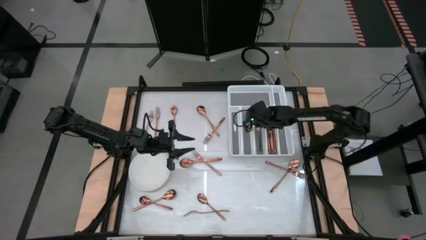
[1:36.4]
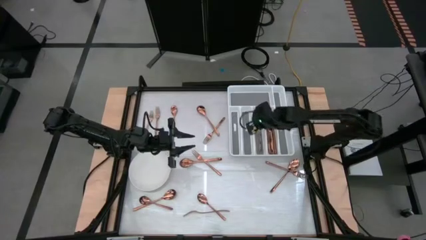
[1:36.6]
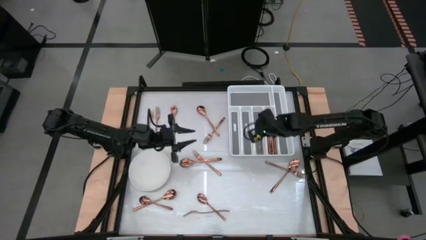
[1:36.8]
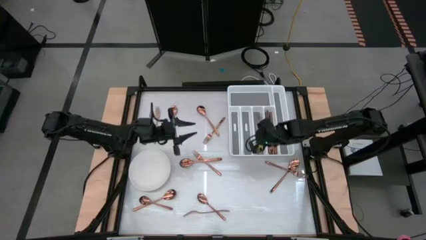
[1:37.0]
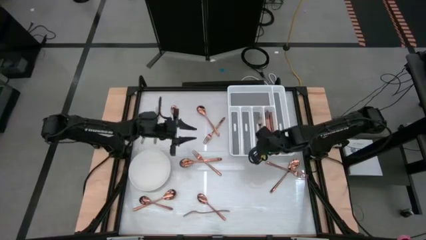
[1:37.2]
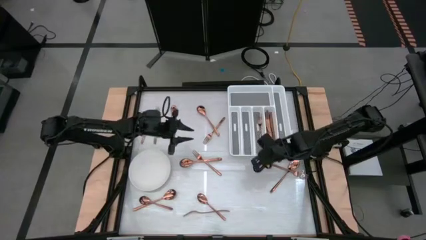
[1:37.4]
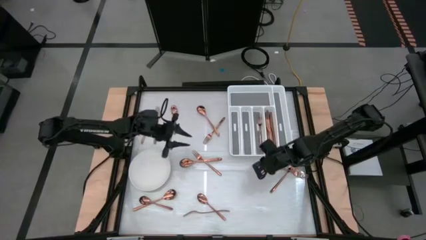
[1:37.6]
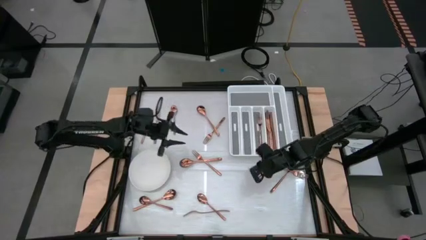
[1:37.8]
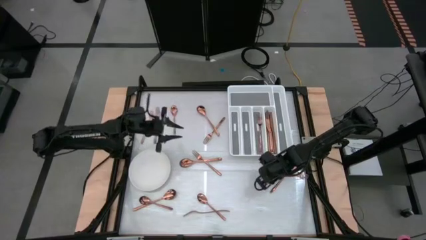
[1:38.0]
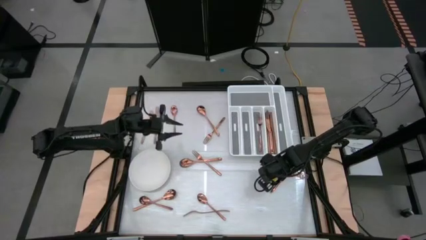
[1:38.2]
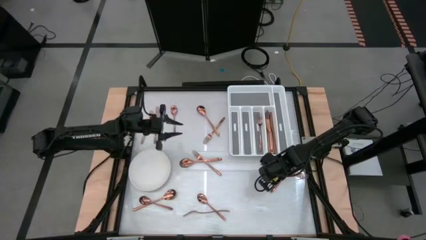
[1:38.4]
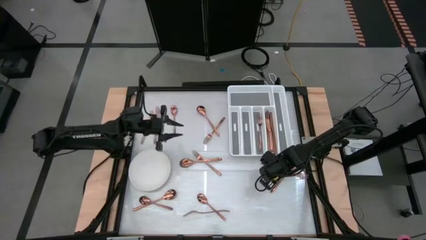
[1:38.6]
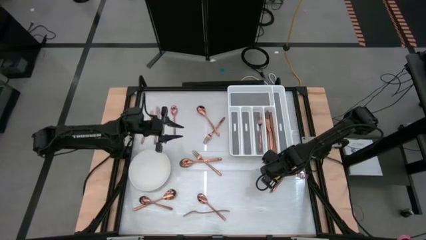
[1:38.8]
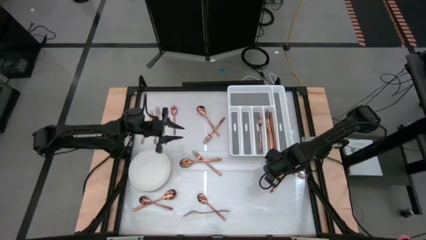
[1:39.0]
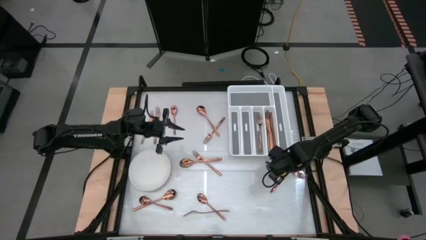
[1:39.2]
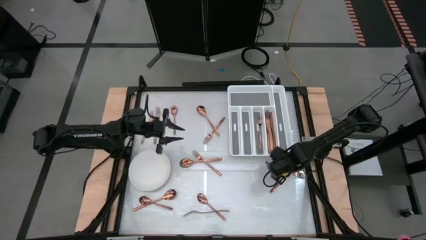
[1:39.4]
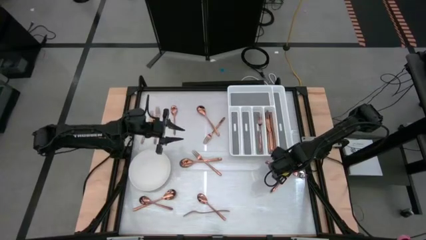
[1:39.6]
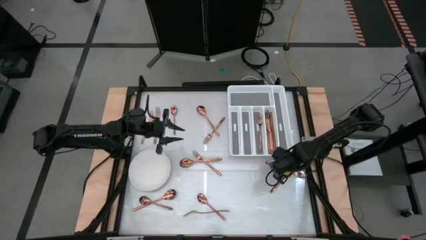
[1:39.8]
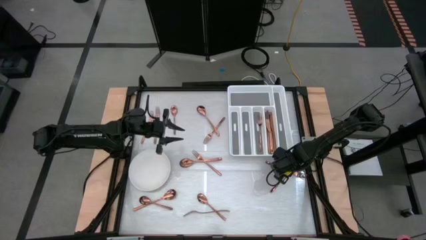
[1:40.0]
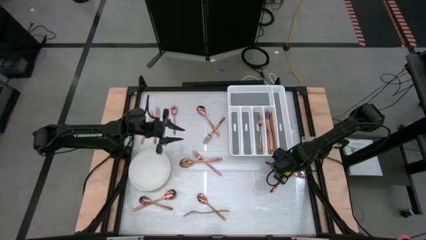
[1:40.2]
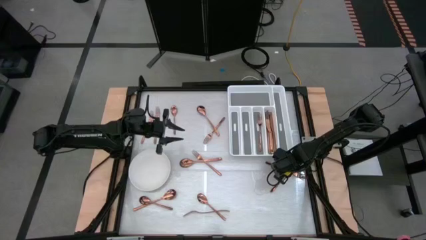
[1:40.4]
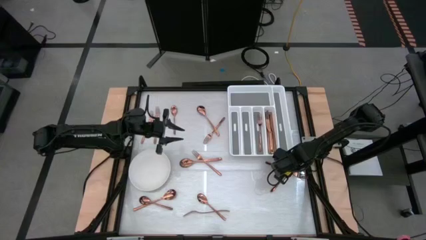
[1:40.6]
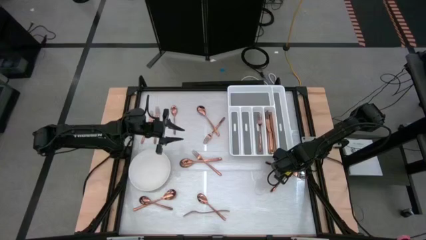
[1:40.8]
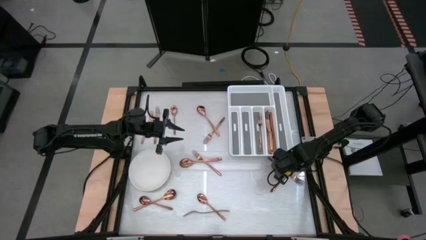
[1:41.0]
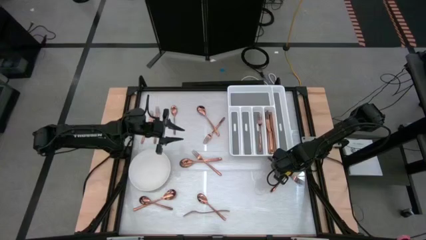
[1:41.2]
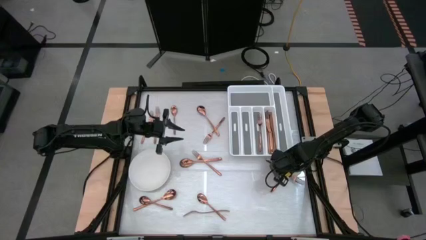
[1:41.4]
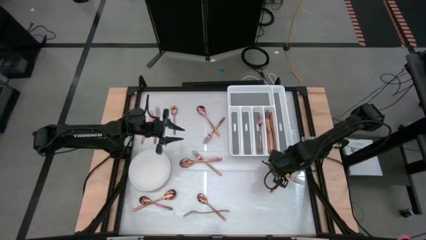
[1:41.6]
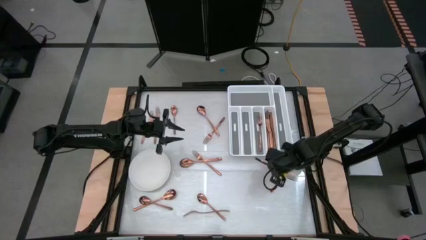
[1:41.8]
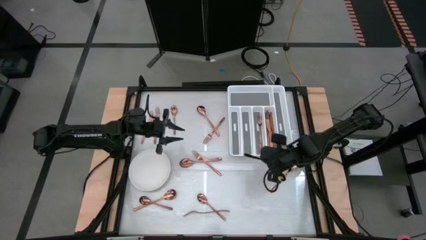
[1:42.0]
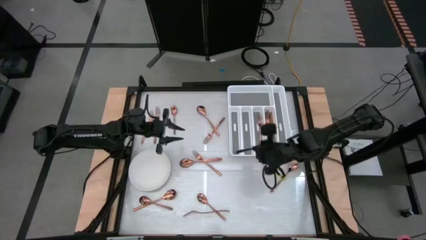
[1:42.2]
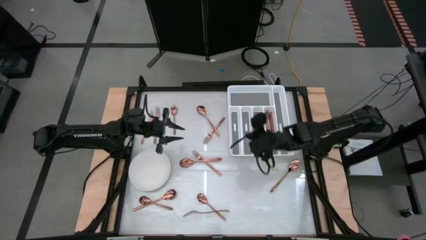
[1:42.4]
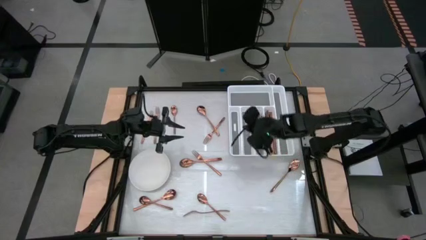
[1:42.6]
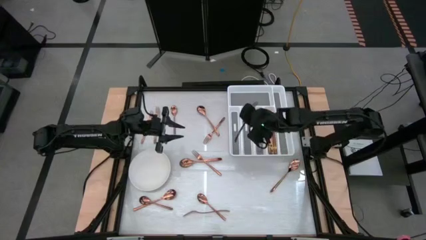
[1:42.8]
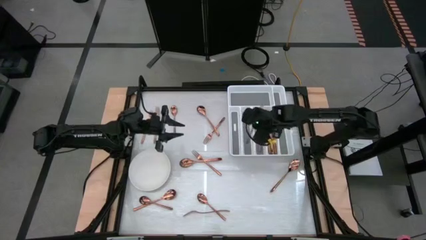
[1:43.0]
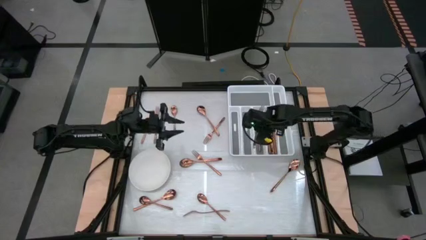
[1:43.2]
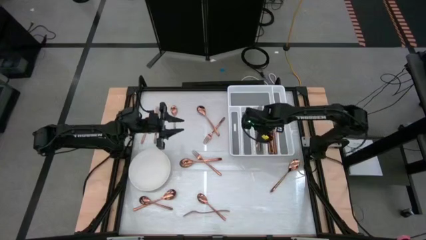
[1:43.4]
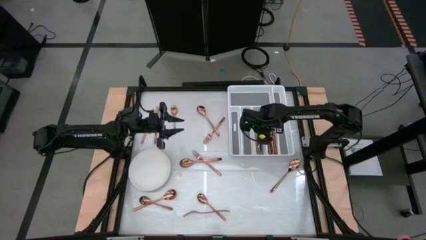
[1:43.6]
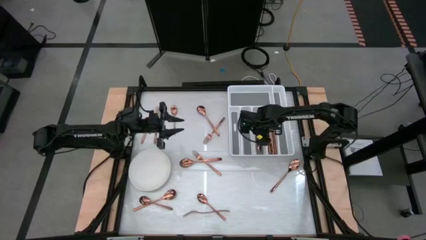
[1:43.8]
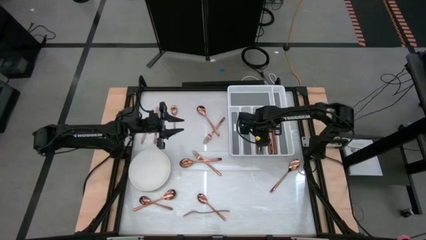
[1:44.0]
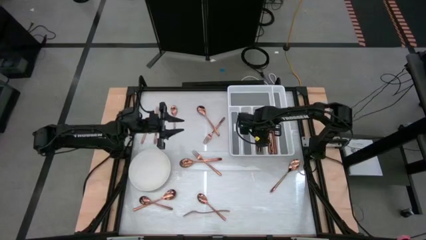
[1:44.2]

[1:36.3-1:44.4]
Task: Sort silverware
Put the bronze fork into the silverware tray

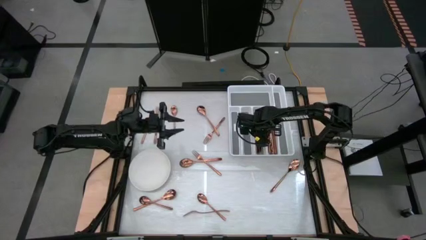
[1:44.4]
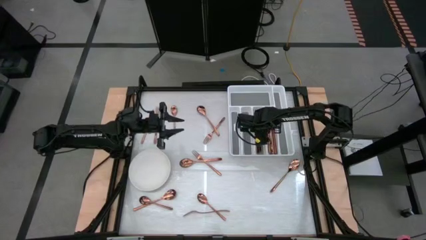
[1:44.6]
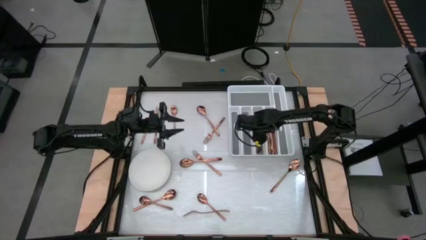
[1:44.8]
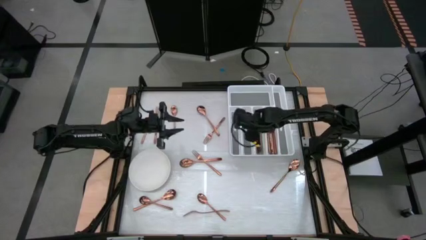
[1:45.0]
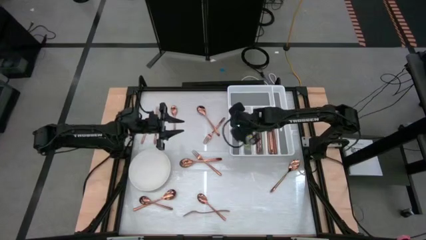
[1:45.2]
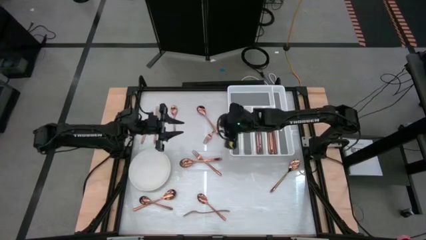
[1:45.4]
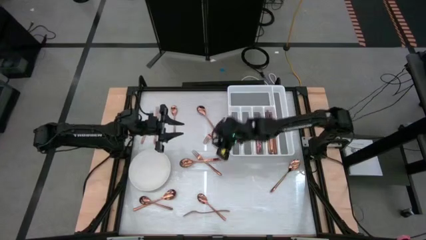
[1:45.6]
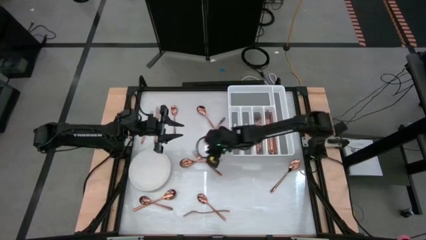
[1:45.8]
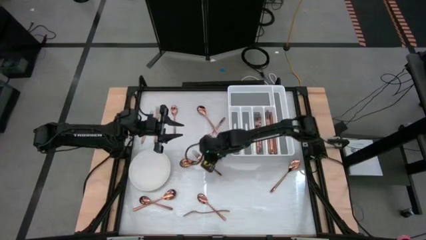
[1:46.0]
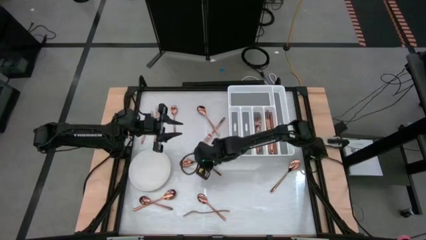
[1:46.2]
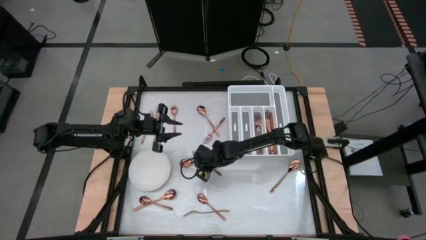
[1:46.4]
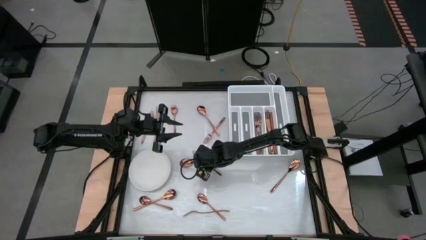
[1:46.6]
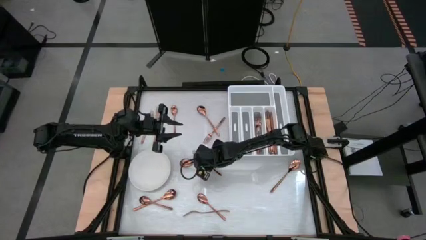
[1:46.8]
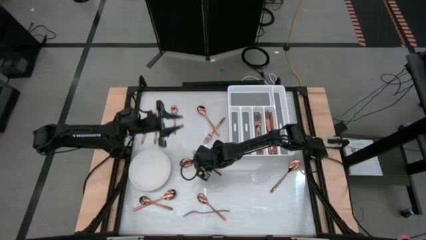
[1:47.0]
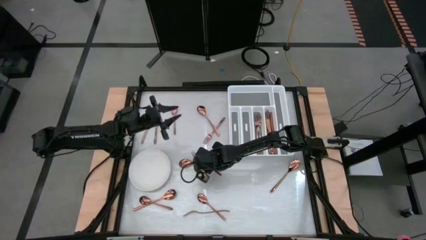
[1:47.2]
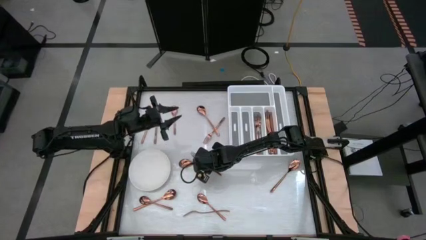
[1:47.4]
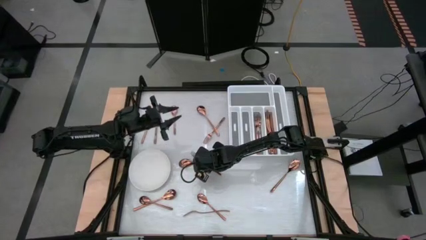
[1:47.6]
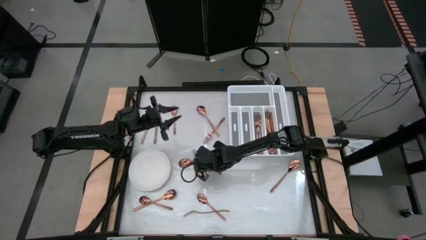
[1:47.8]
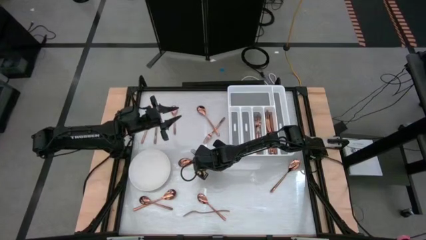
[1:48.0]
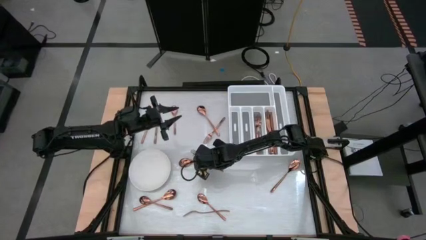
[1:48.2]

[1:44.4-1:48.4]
Put the bronze fork into the silverware tray

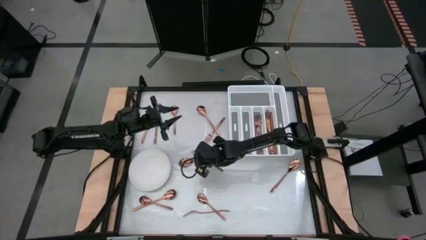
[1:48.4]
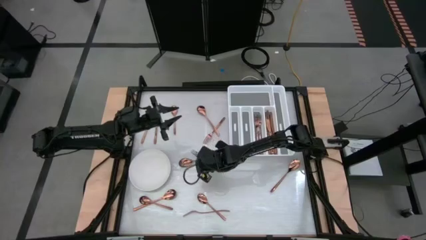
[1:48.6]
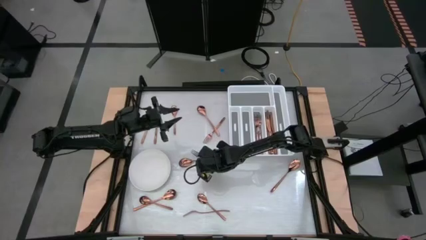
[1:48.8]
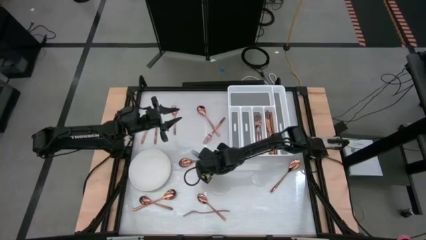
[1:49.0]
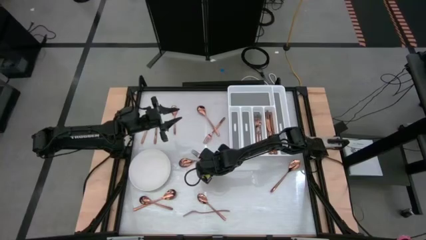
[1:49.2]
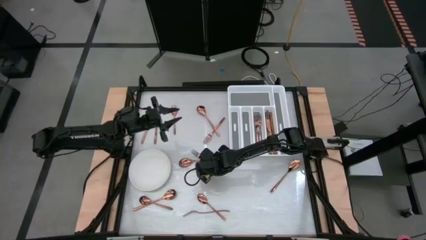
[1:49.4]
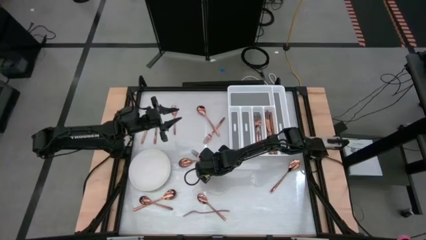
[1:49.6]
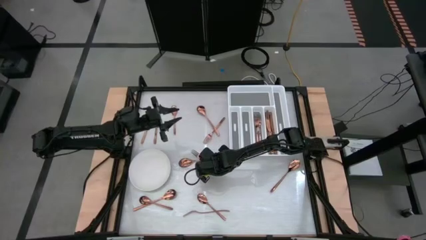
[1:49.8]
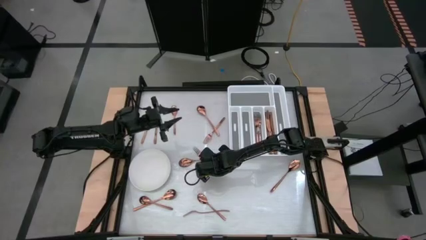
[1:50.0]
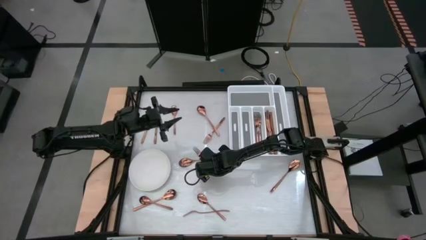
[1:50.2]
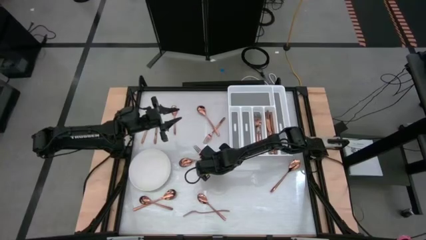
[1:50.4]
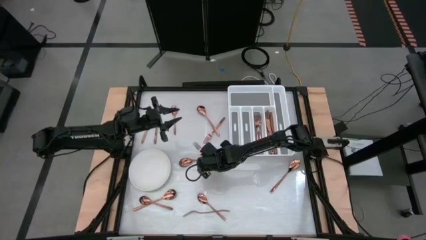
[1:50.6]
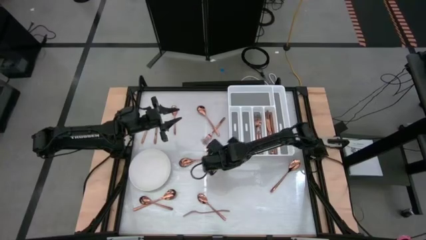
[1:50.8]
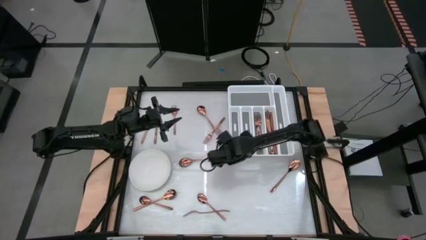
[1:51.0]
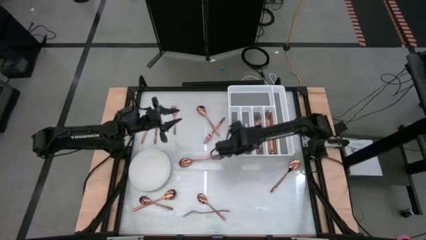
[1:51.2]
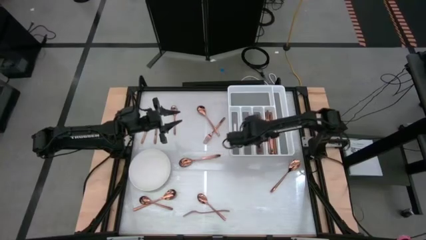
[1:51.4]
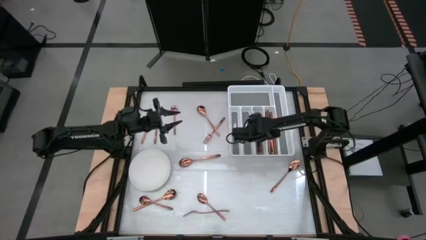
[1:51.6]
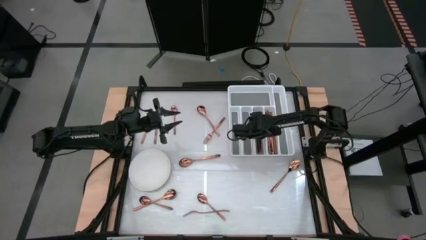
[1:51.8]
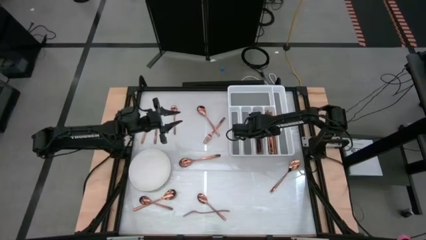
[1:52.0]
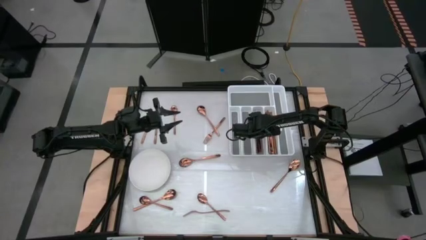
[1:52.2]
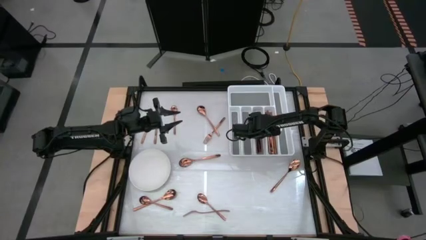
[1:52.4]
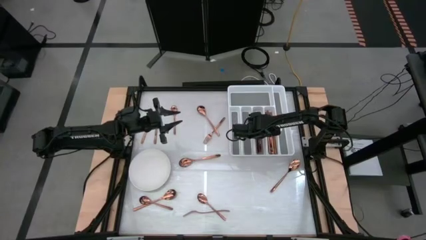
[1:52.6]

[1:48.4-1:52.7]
Put the bronze fork into the silverware tray
